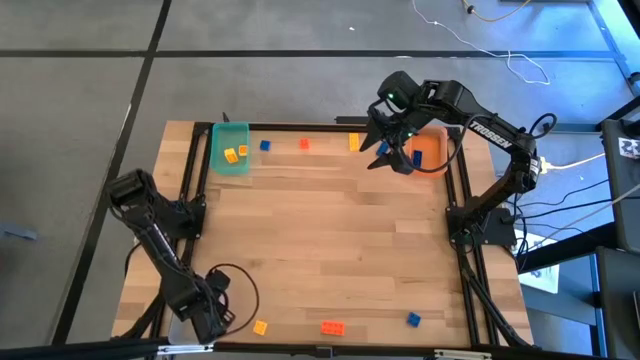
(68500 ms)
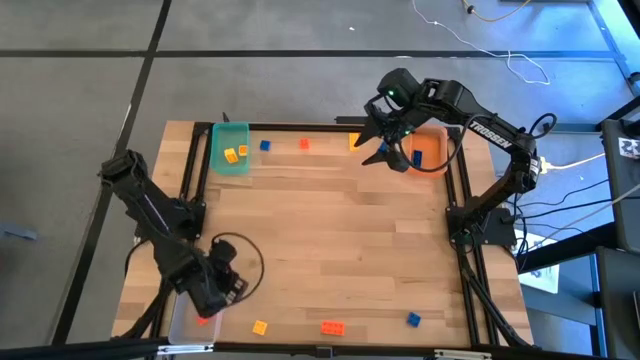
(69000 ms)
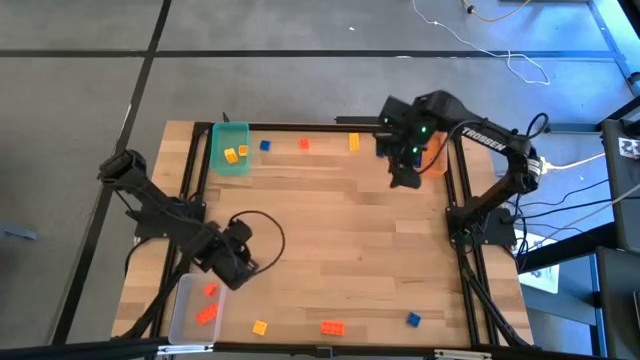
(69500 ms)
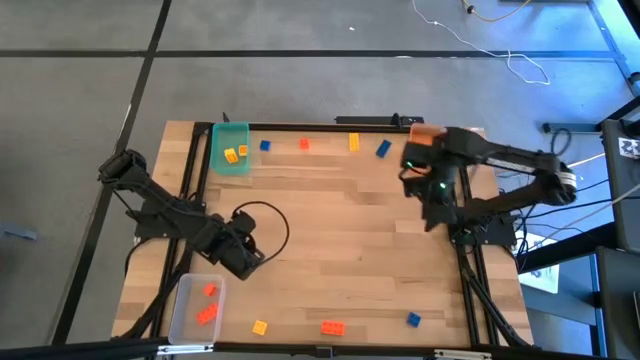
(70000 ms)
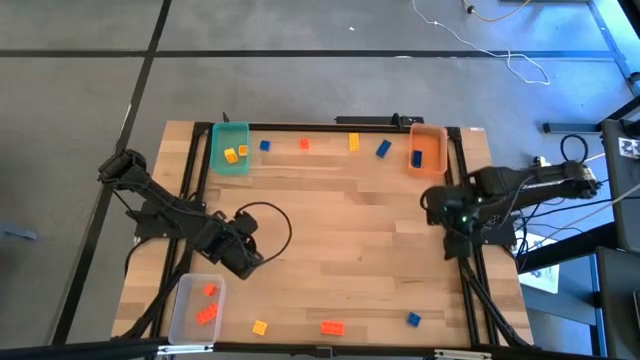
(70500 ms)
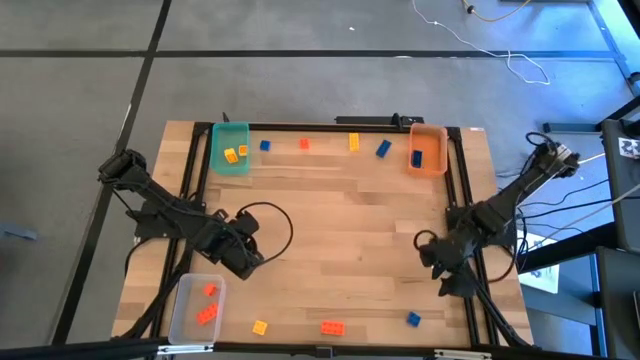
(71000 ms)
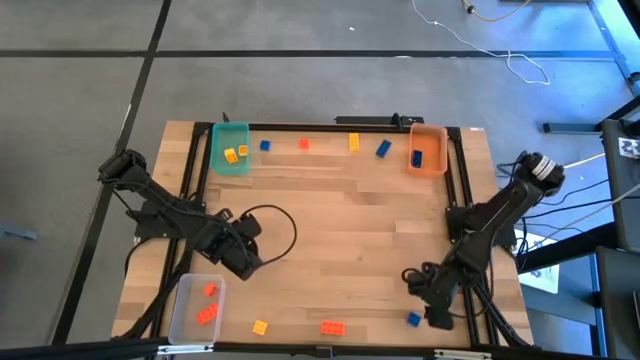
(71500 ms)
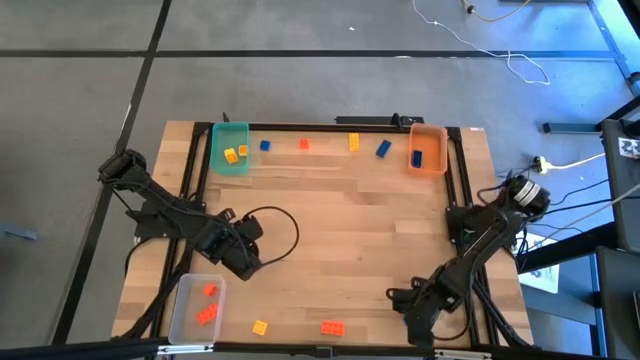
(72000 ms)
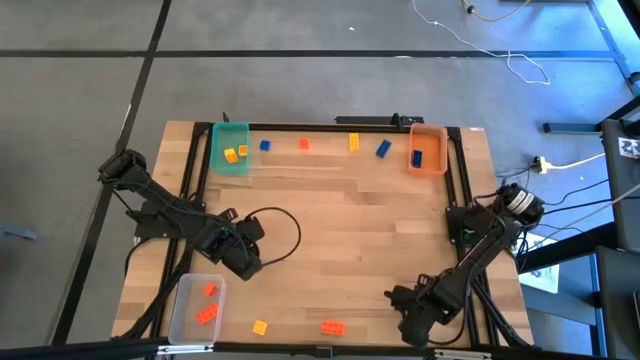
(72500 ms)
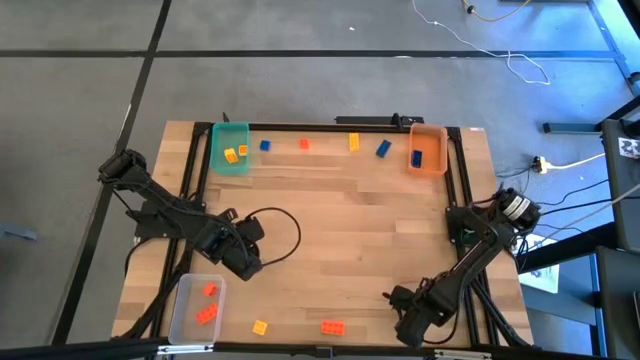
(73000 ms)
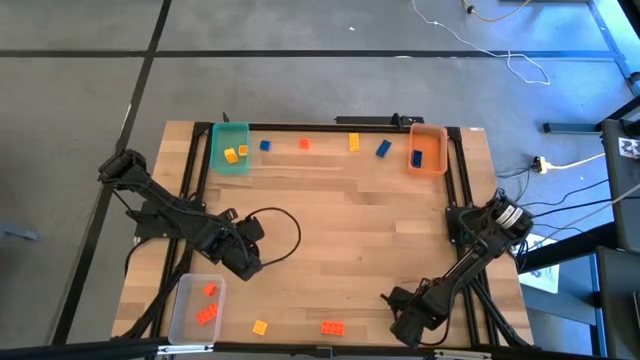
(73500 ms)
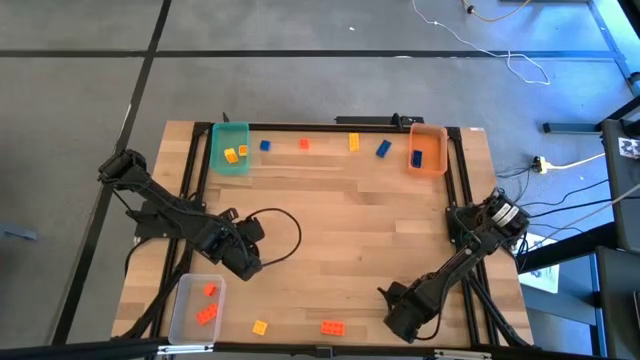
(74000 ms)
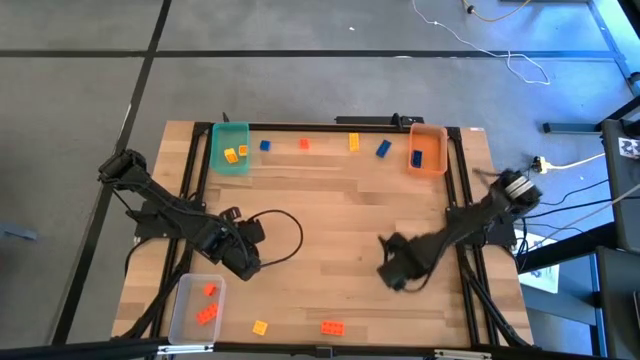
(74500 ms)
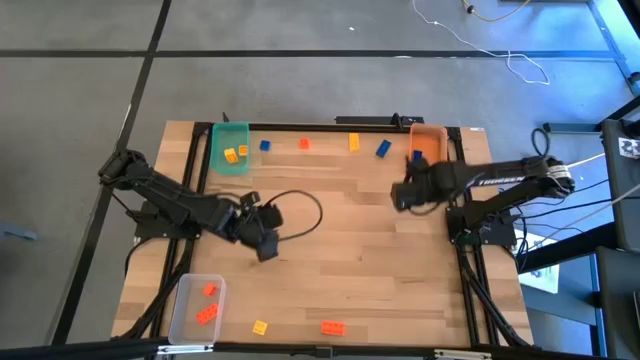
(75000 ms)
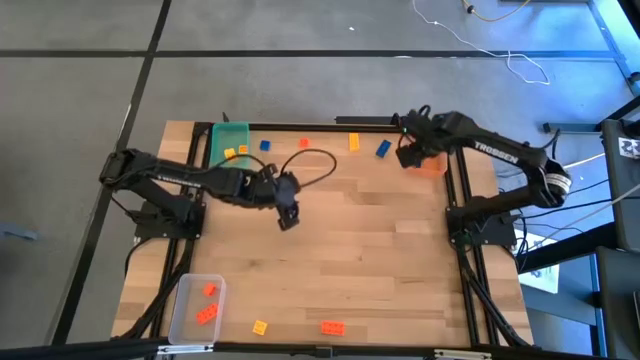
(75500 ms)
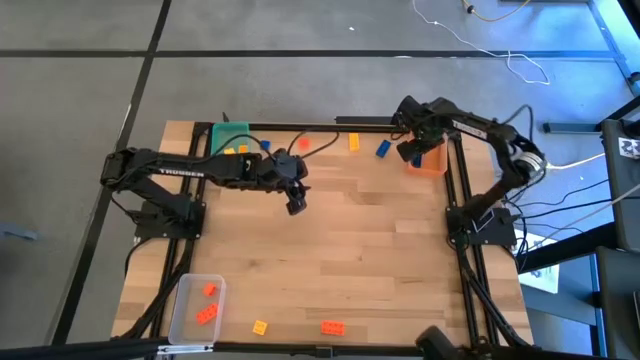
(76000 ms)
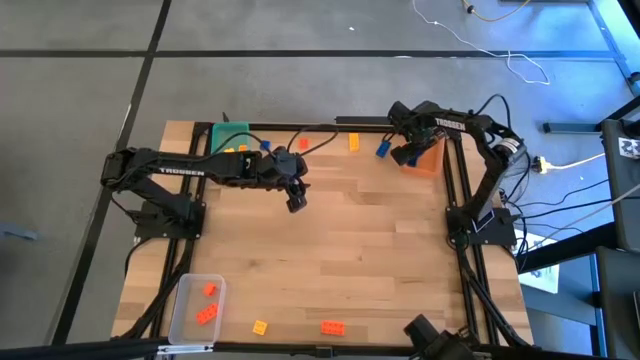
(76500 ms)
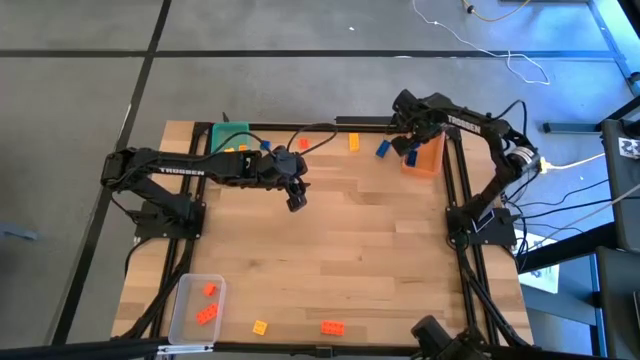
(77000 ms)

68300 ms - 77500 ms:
Task: Sort & place blocks by color
Put the blue game piece into the orange bin

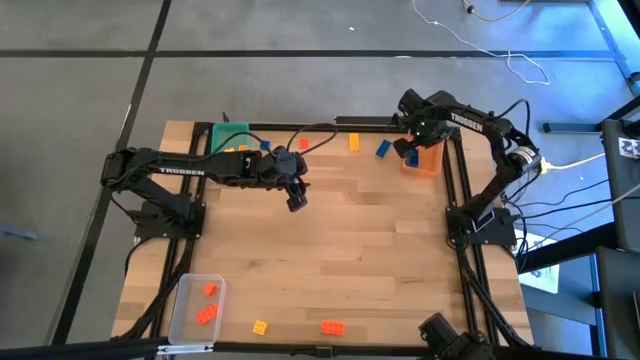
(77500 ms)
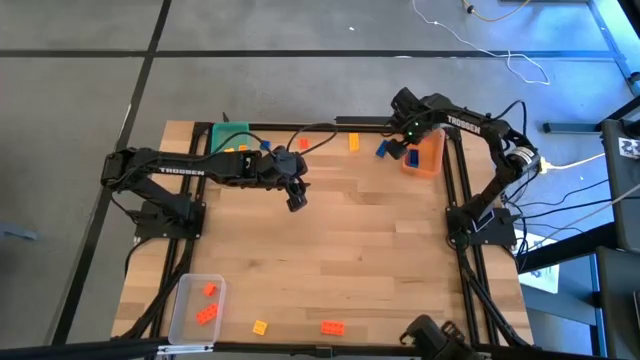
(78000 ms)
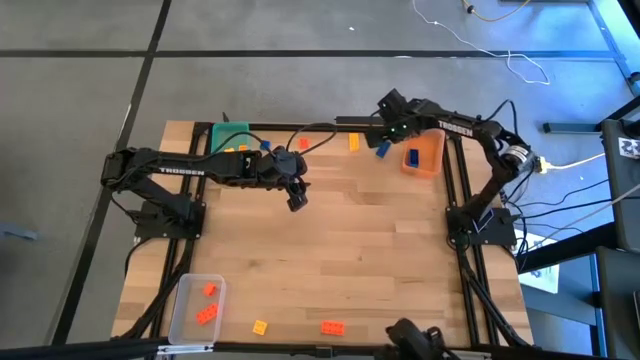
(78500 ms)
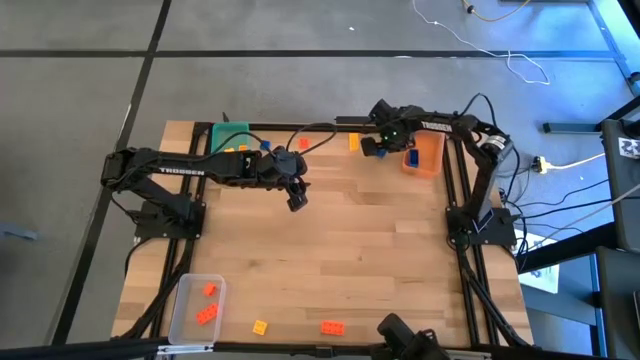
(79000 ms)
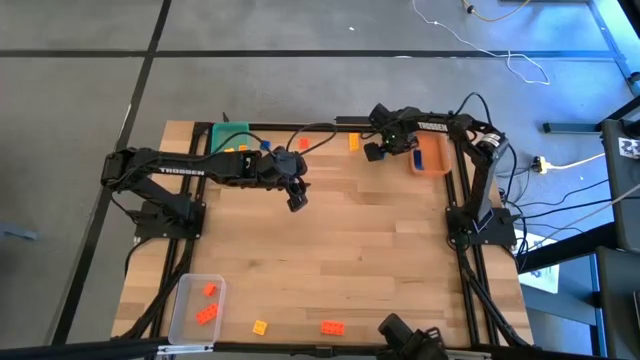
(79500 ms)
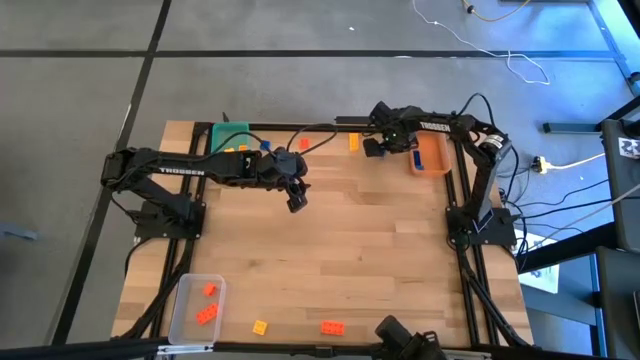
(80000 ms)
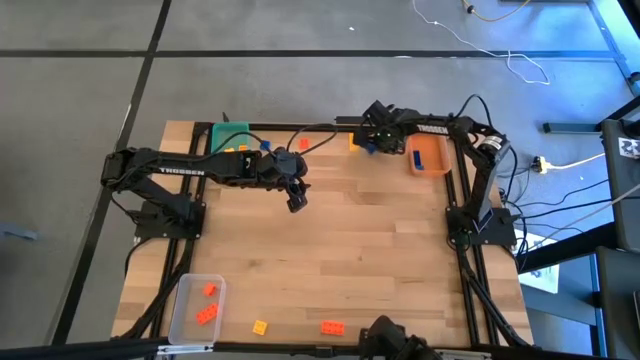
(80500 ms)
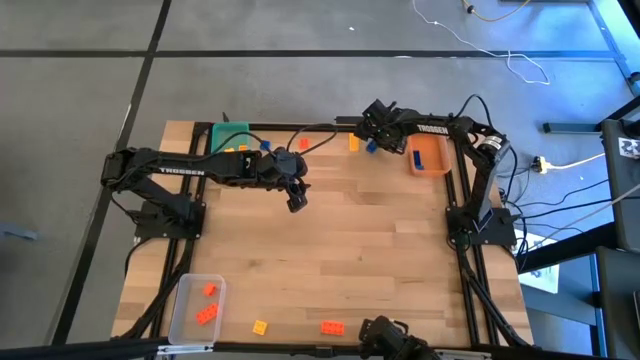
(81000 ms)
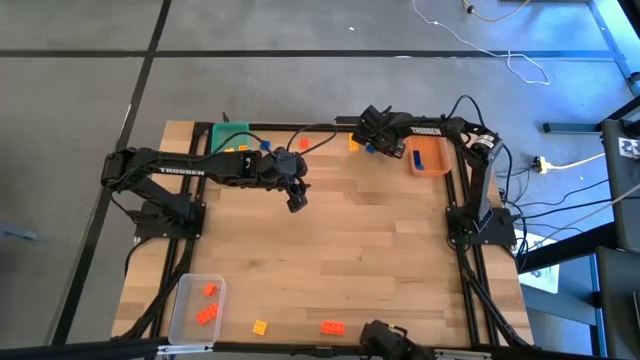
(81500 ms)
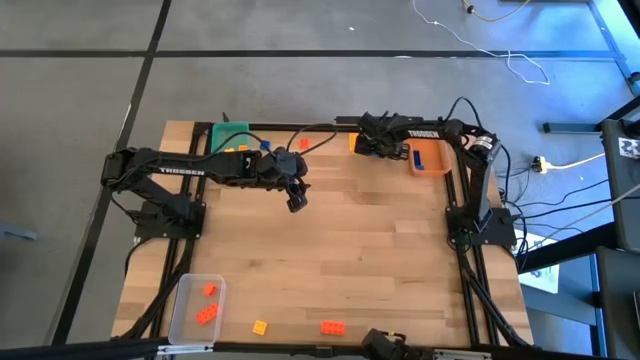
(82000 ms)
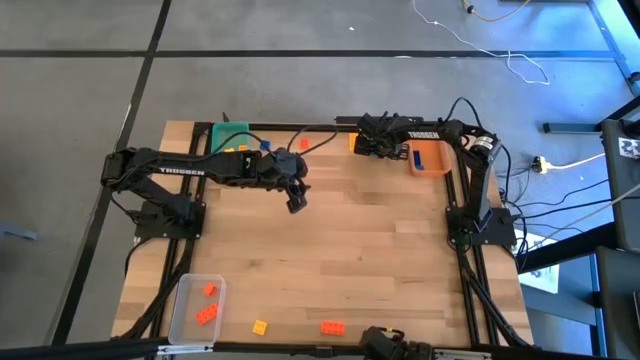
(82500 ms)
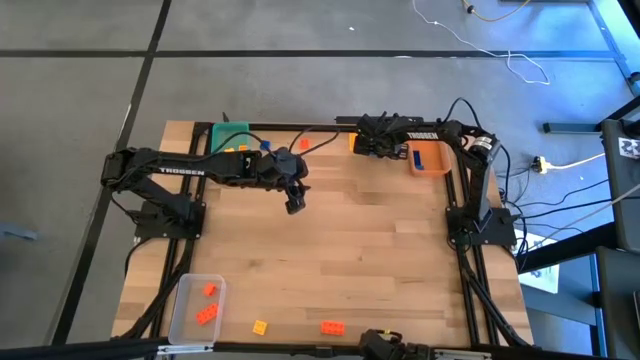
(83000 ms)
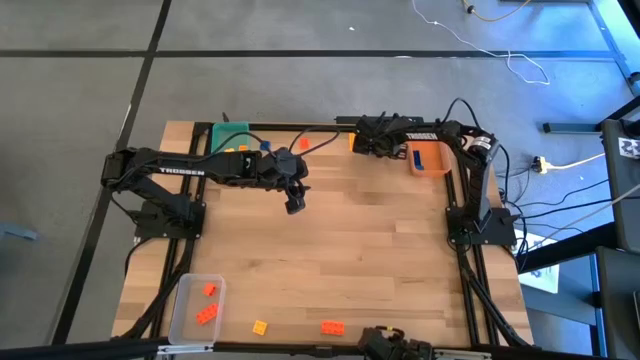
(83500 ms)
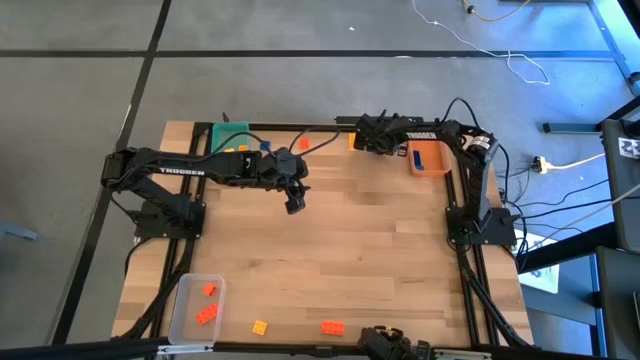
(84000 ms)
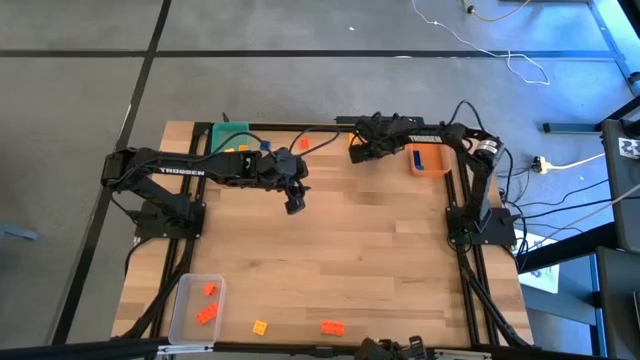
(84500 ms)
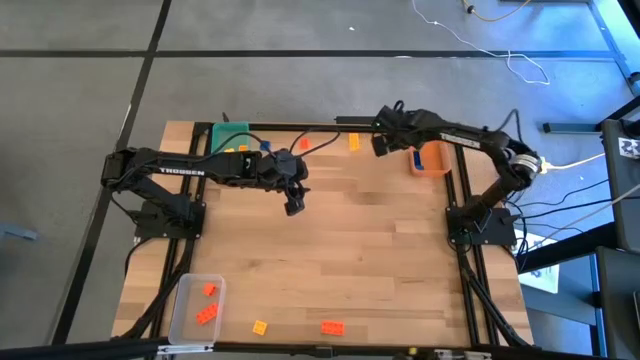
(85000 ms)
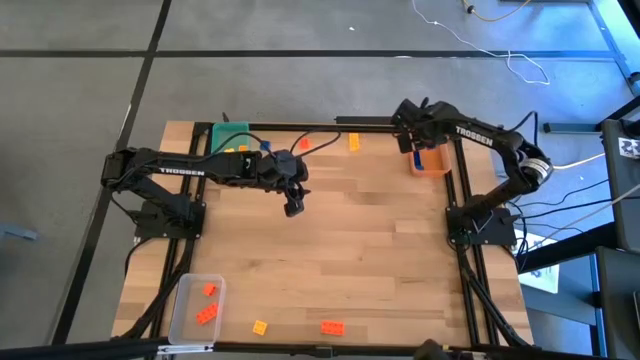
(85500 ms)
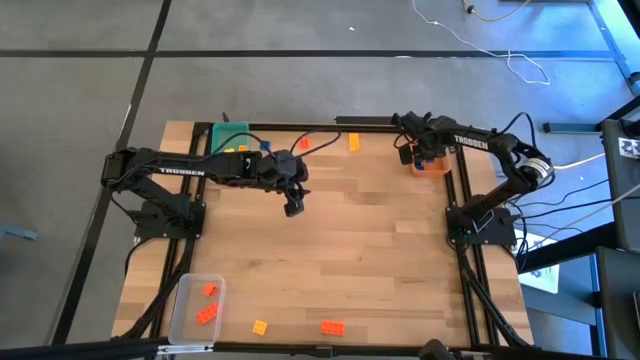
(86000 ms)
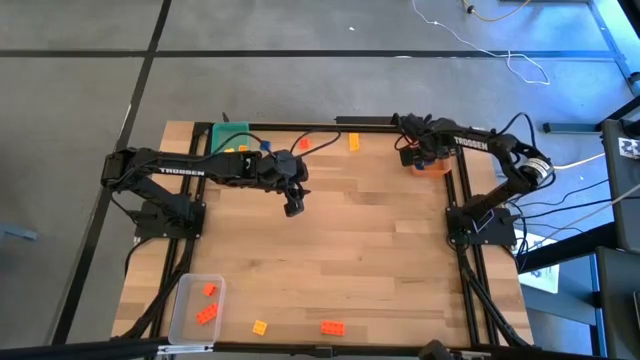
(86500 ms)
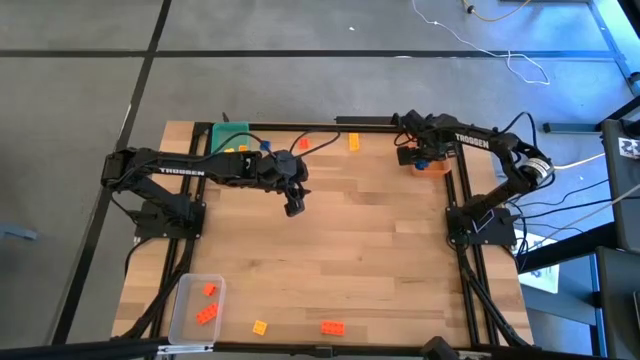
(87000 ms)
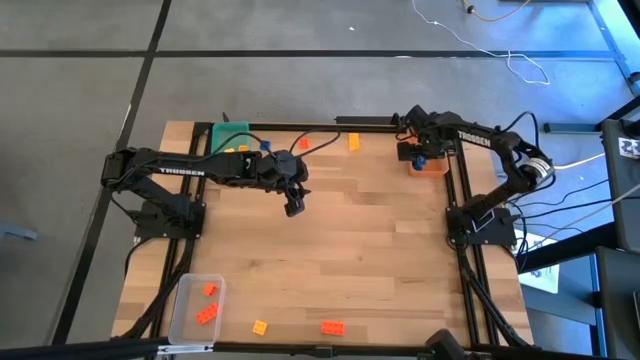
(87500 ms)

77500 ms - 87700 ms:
Put the blue game piece into the orange bin

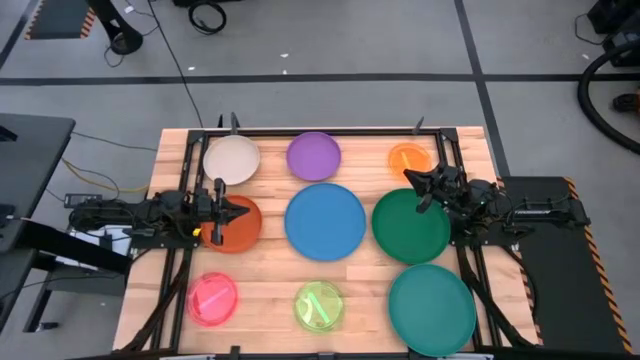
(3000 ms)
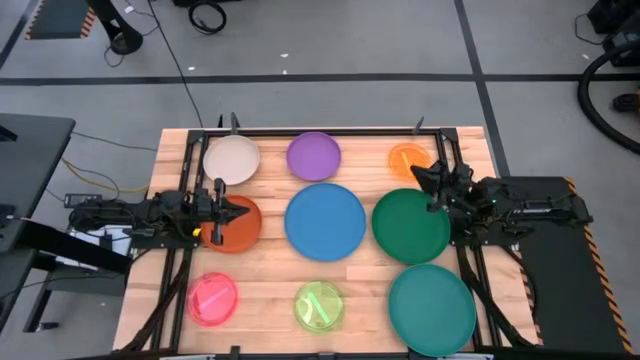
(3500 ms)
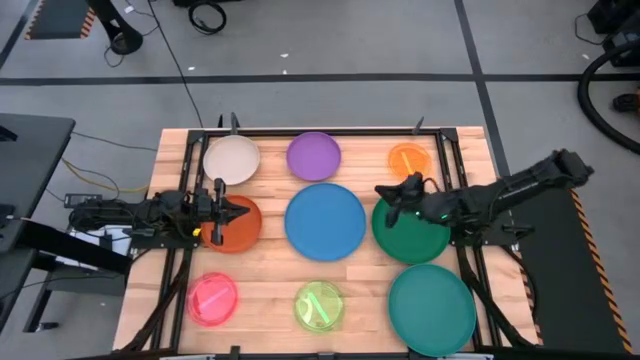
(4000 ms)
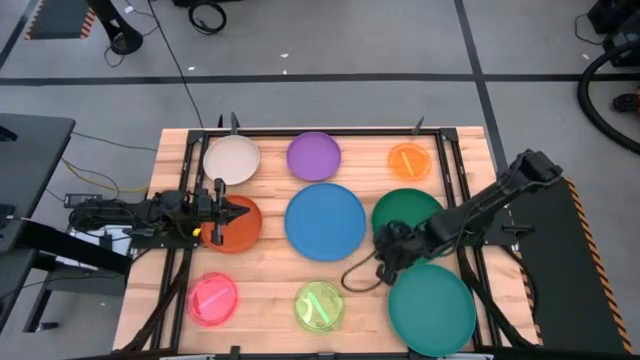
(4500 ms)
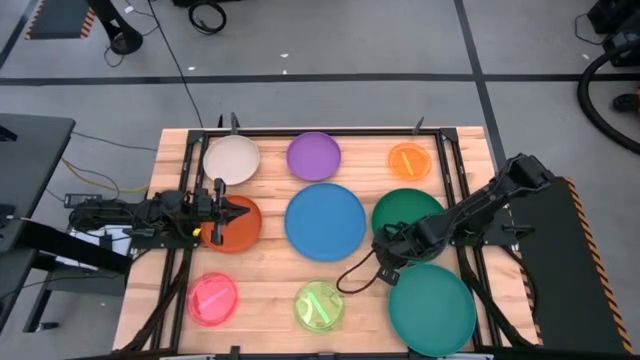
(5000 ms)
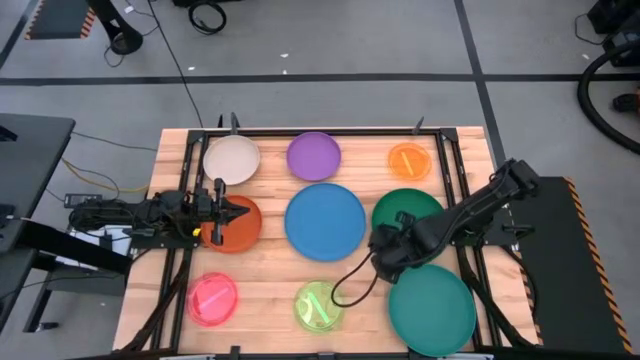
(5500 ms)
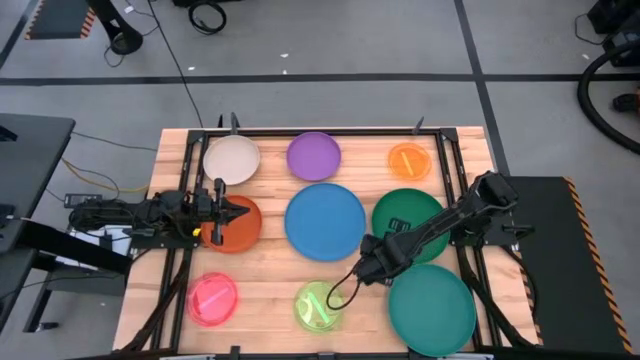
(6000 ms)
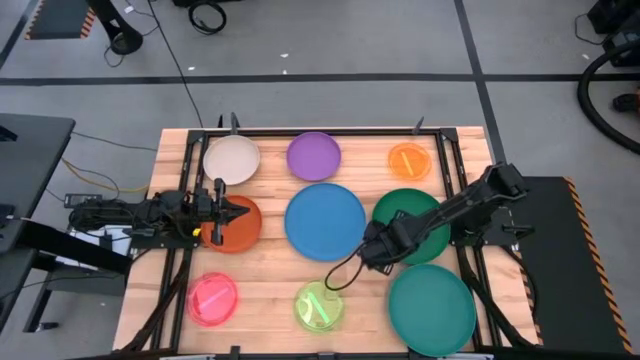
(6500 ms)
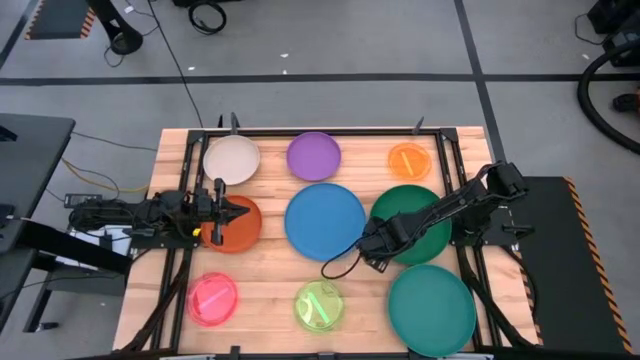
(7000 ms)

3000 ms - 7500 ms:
Task: Stack plastic plates
Stack the green plate on top of the light green plate
